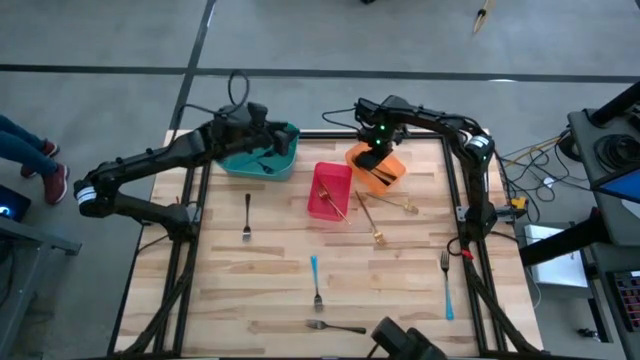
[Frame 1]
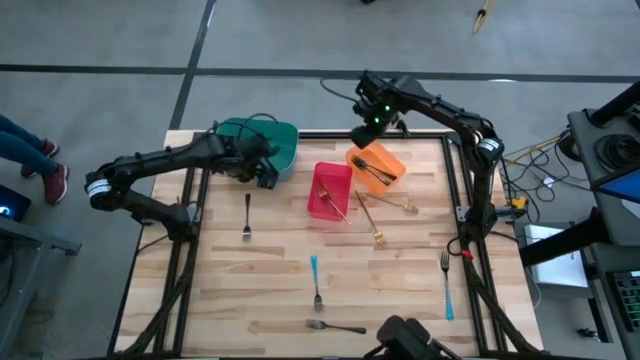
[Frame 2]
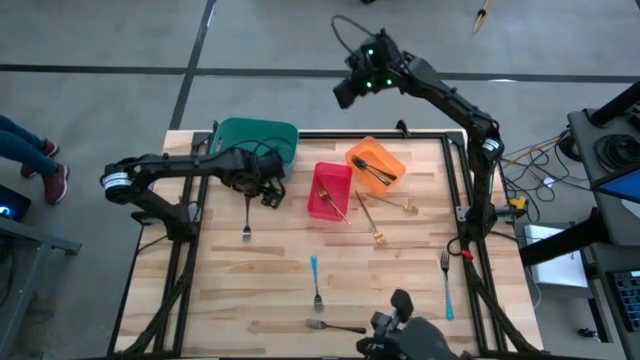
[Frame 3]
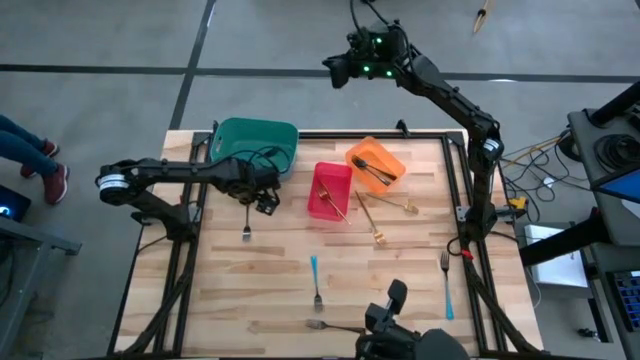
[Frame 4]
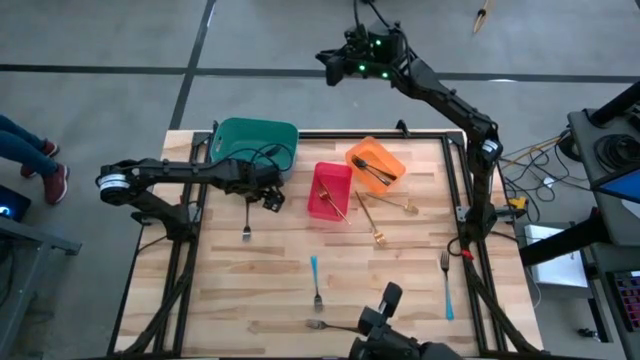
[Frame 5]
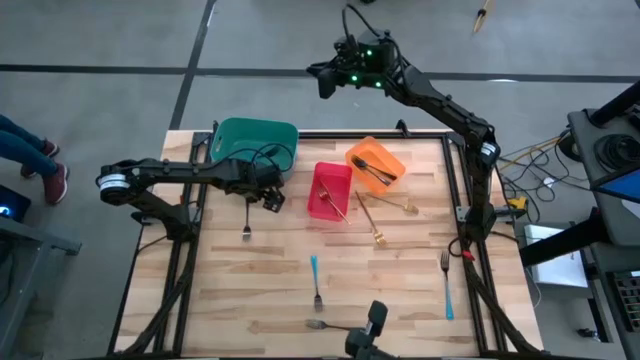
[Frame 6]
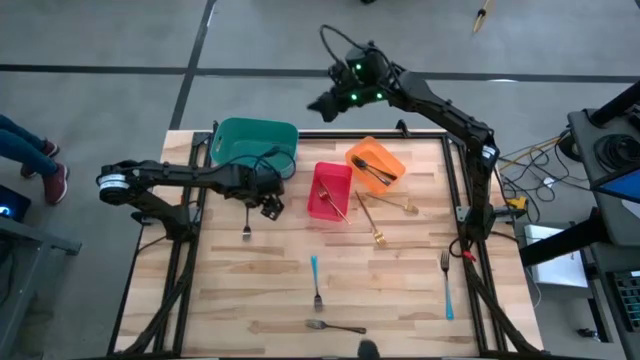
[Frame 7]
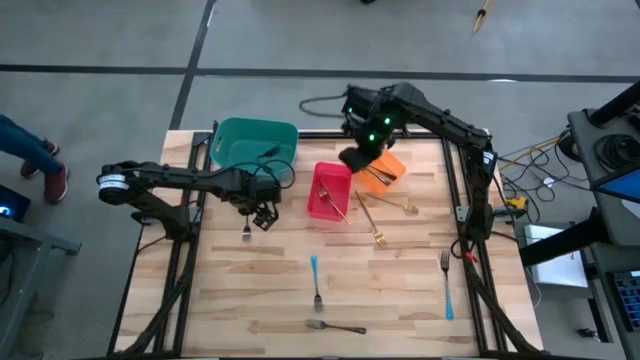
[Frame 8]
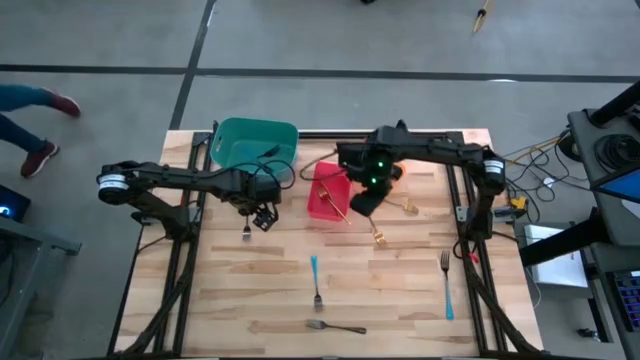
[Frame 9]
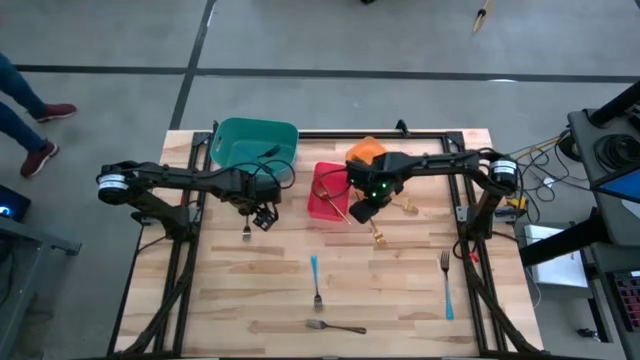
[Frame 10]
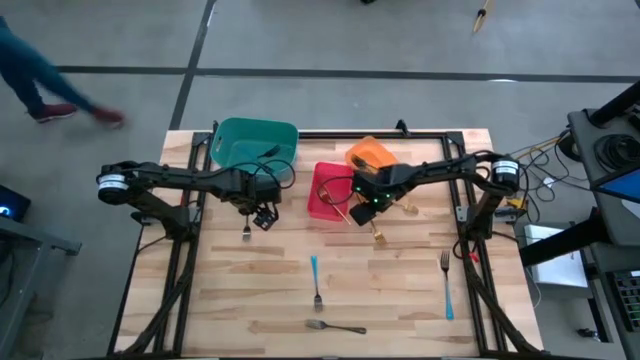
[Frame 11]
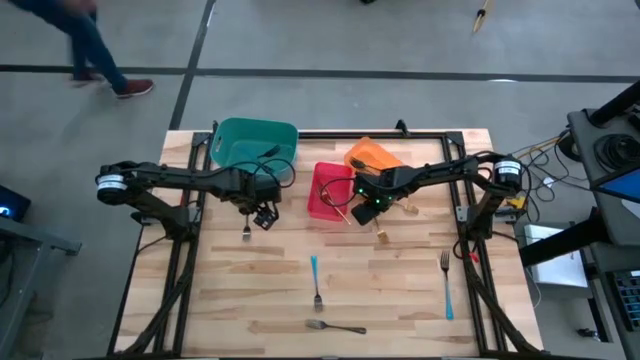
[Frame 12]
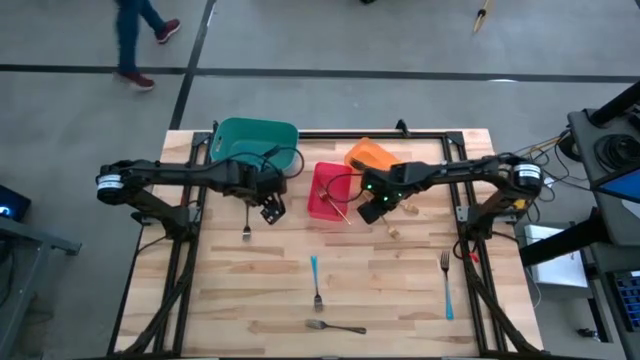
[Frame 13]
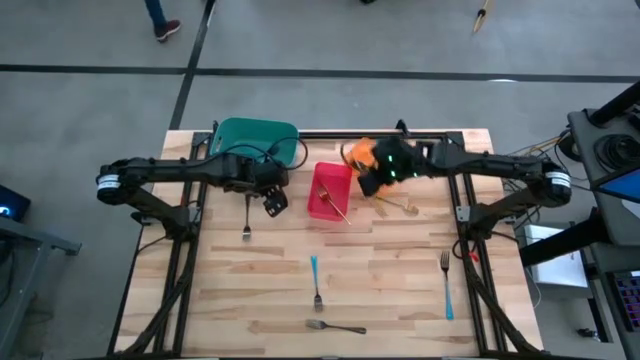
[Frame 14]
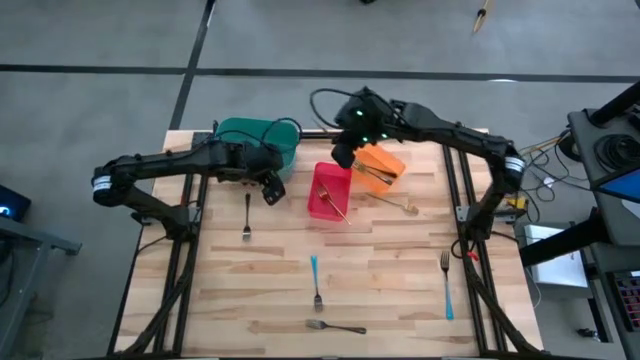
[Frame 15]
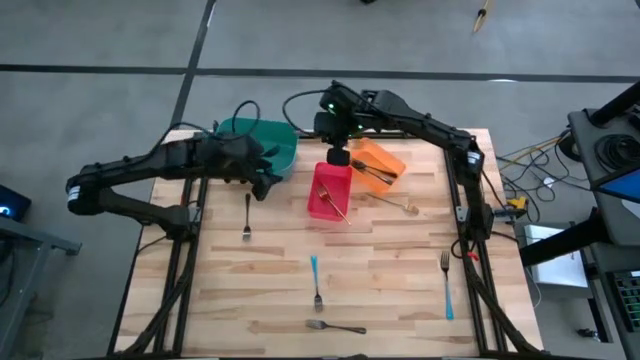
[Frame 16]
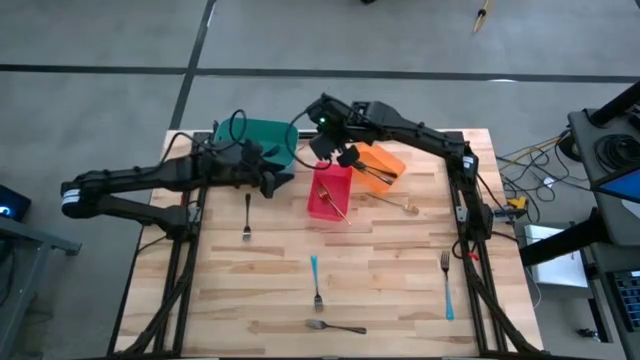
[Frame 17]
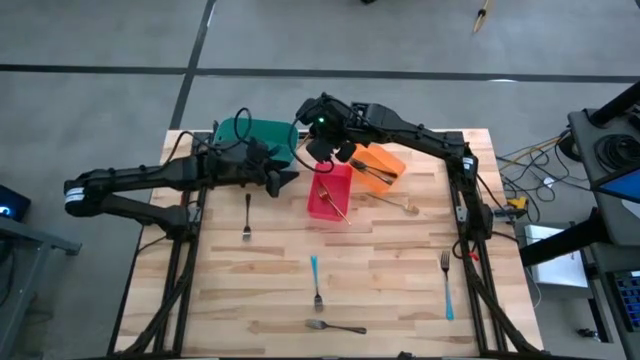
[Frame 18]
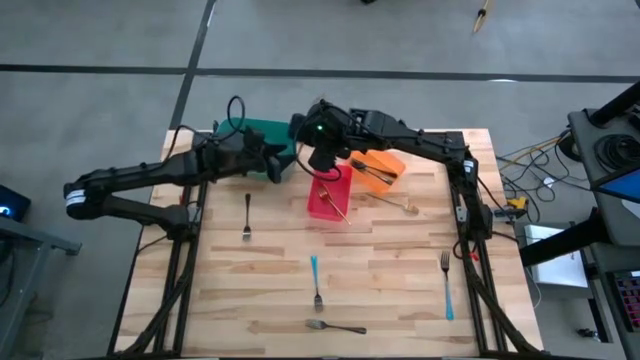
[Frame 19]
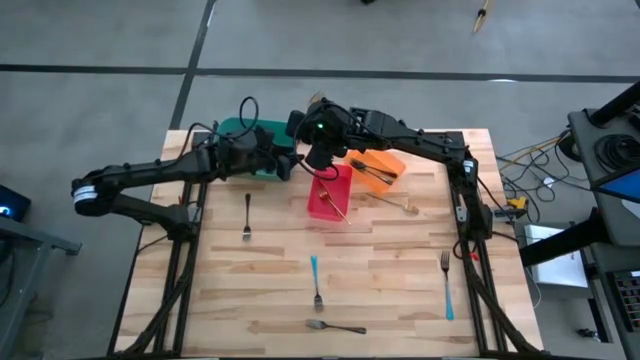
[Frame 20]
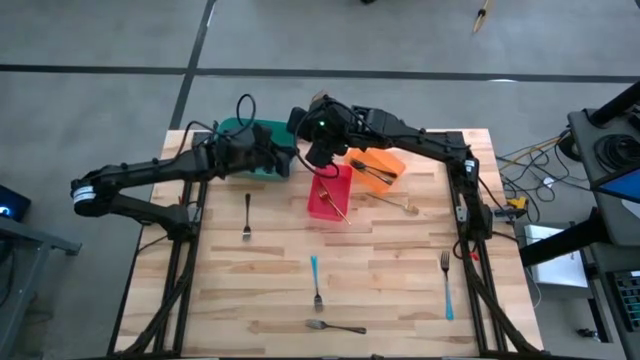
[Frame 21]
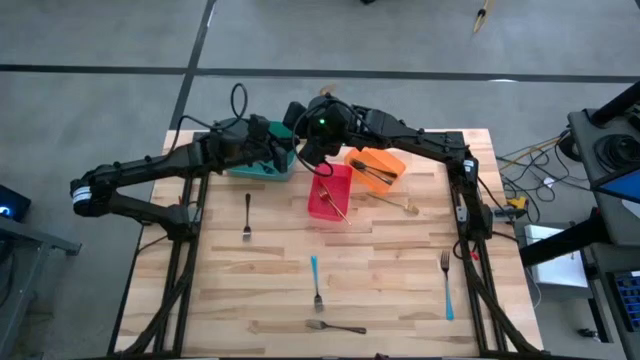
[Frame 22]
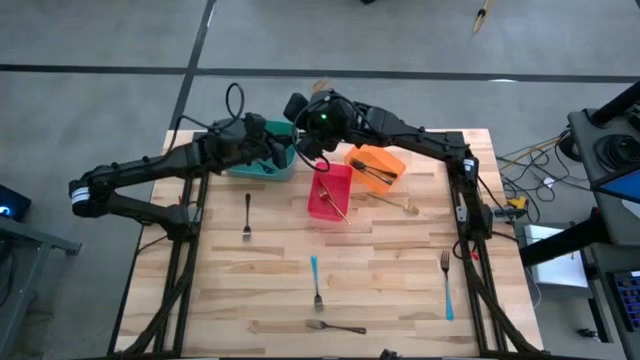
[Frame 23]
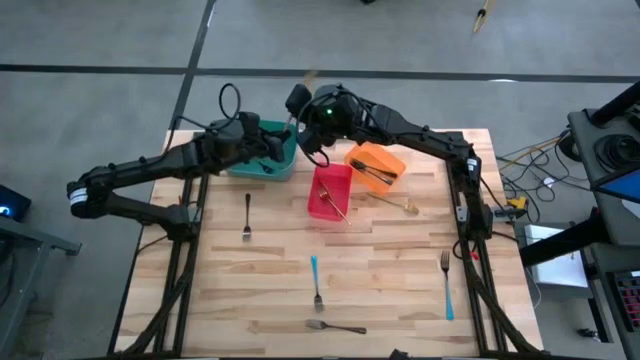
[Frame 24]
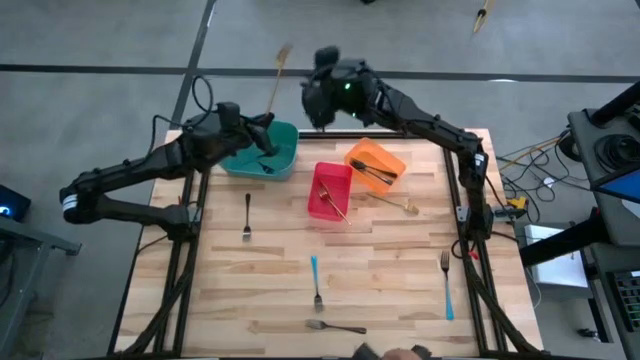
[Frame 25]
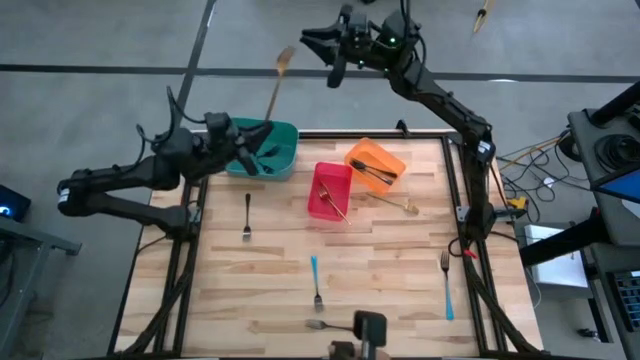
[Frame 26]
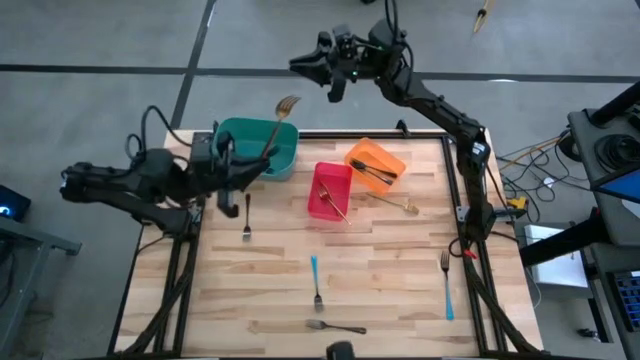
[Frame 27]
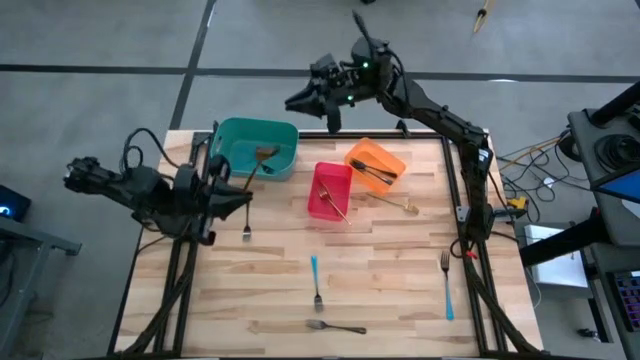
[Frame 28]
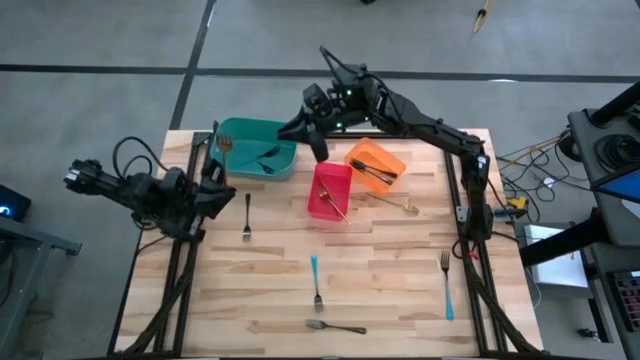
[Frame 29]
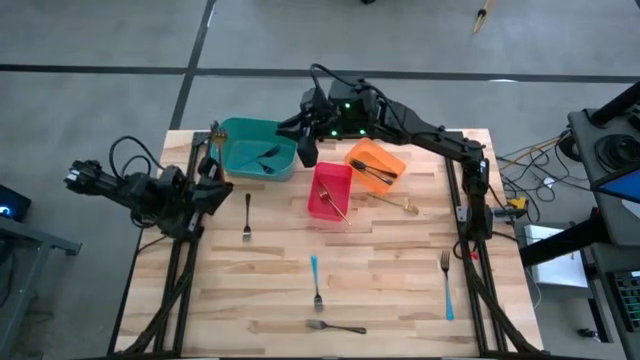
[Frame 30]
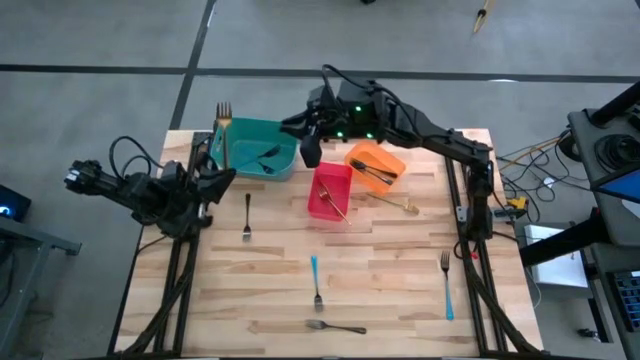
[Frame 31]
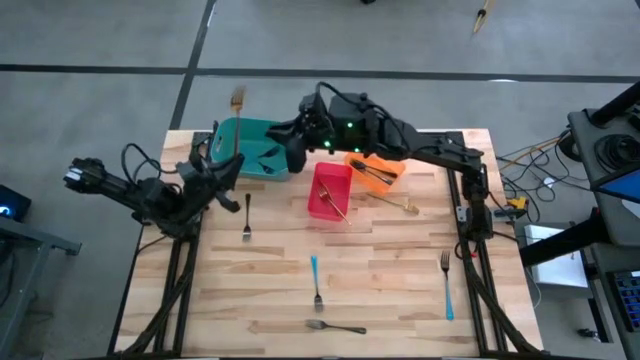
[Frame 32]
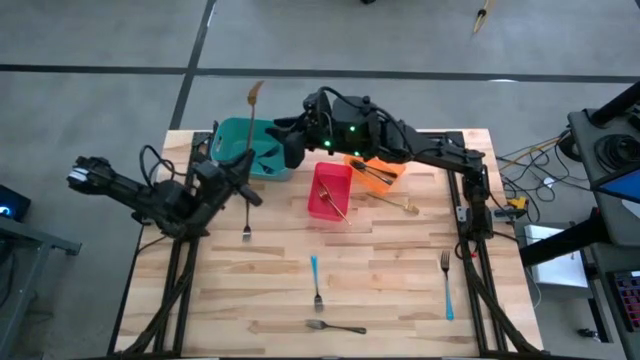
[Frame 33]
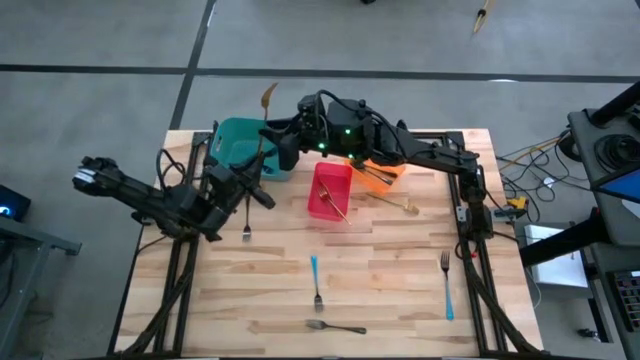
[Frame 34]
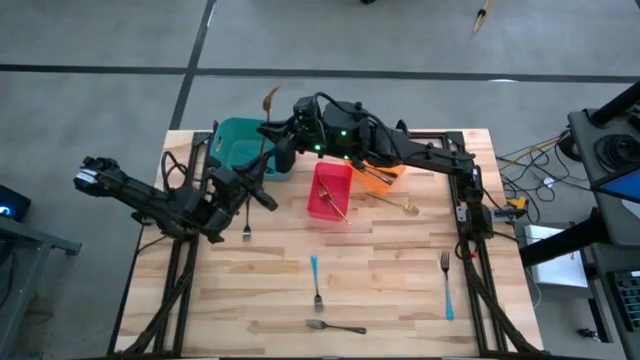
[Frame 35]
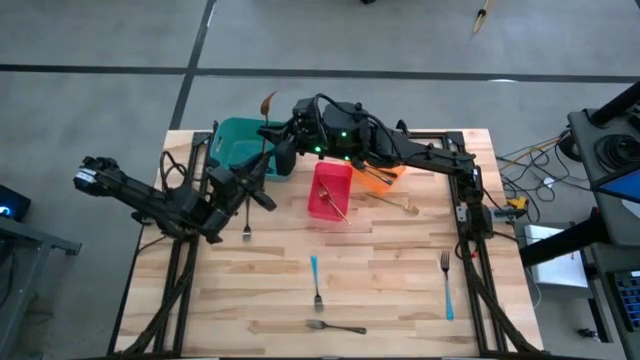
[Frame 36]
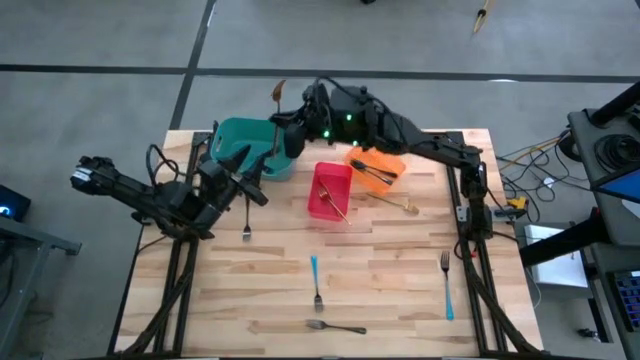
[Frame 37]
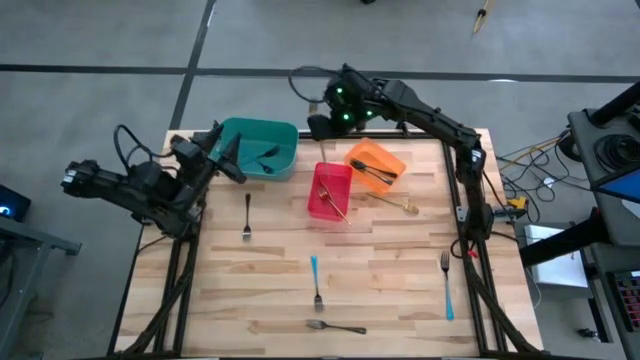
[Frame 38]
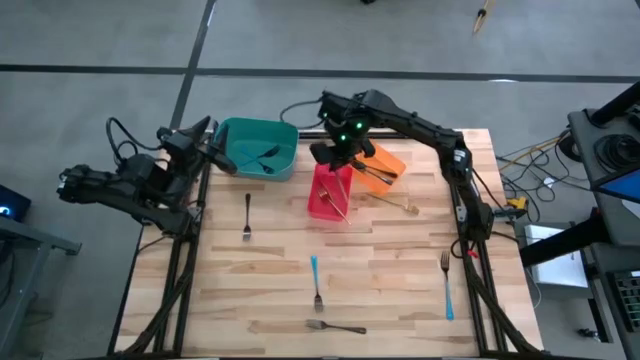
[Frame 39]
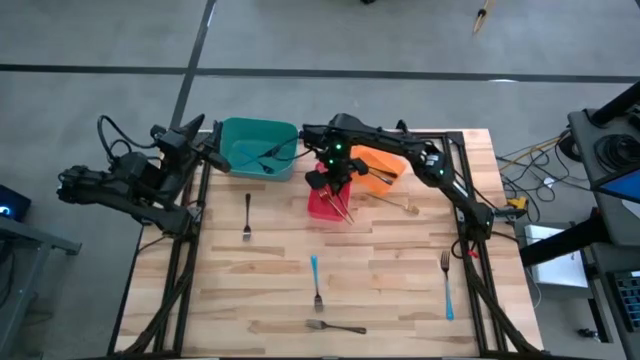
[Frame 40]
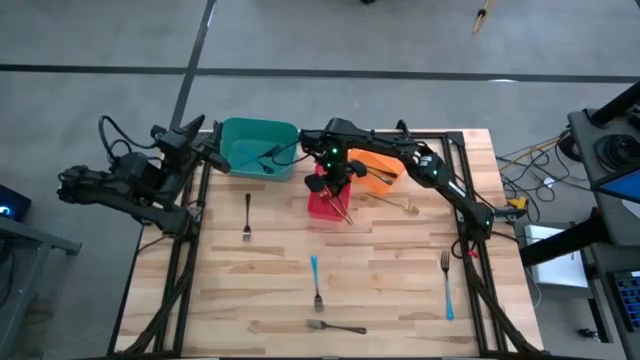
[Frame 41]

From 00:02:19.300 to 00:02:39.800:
Task: Sort silverware by color (type)
Put the golden fork into the red bin

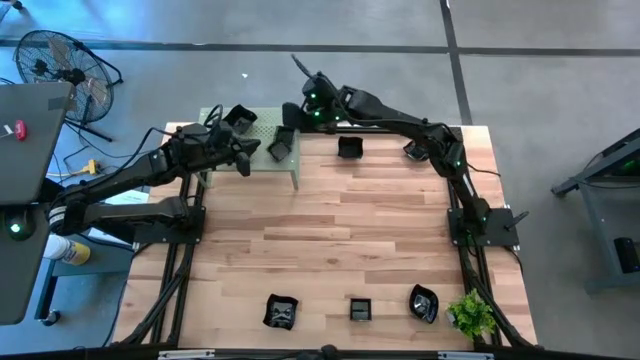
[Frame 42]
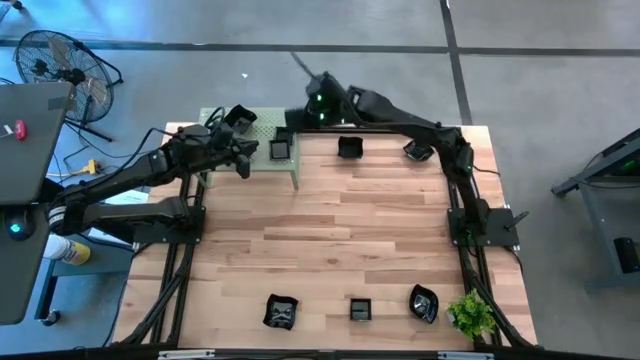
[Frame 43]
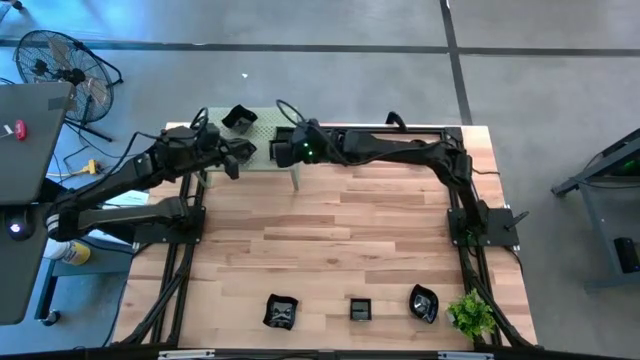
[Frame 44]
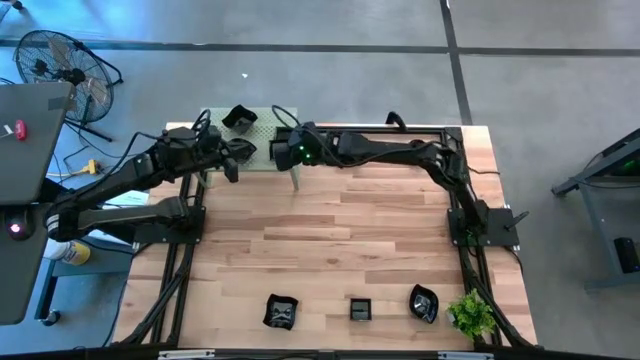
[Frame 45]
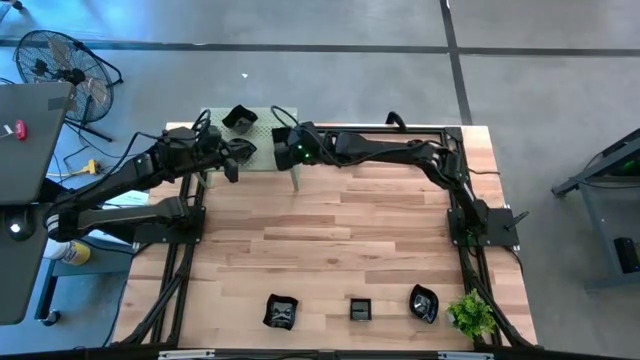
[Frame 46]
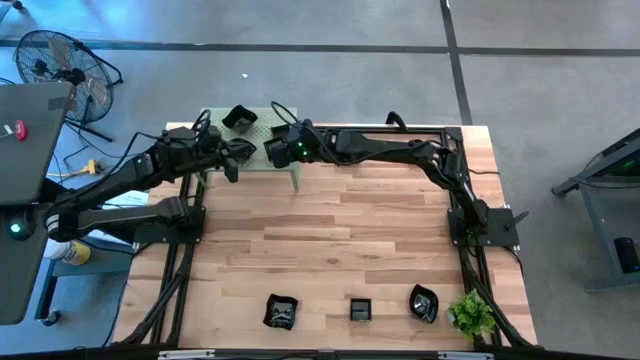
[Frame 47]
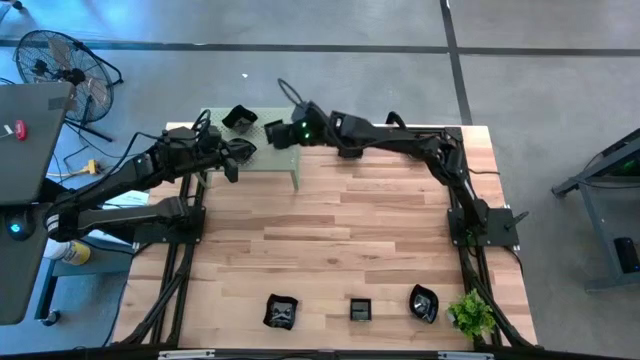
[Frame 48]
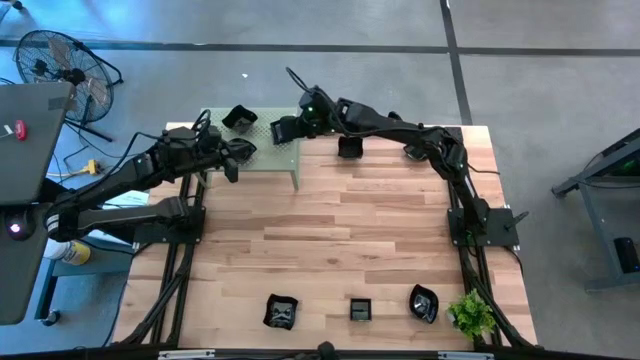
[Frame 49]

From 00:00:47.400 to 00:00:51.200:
Task: Pick & Place Mini shaped plates
Stack the black square plate on top of the stacked black square plate on the shelf
